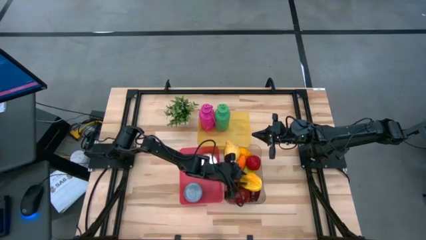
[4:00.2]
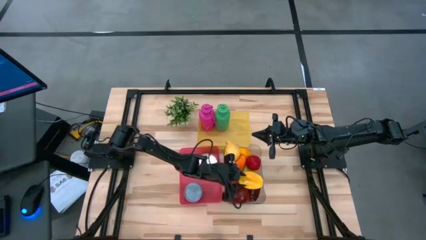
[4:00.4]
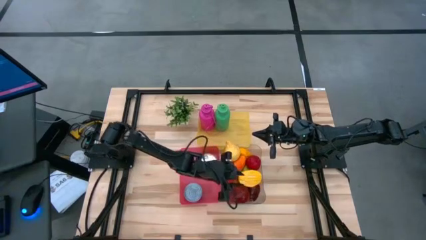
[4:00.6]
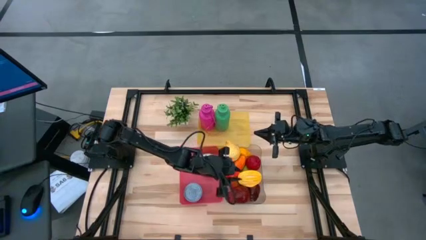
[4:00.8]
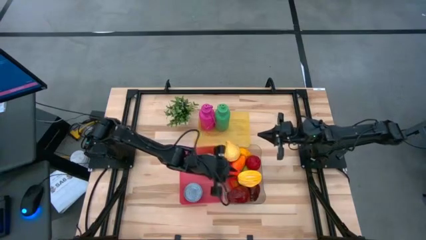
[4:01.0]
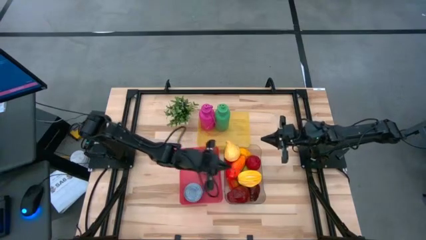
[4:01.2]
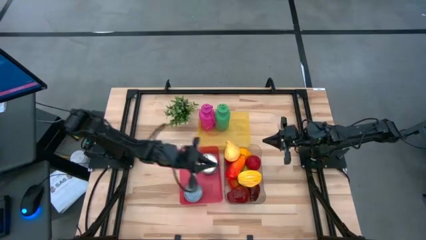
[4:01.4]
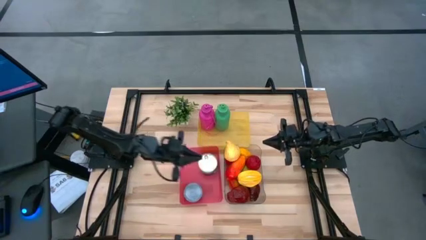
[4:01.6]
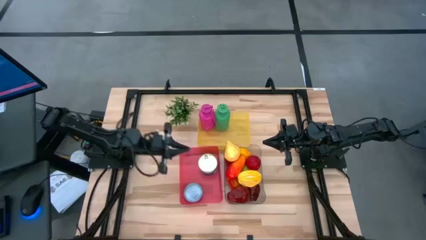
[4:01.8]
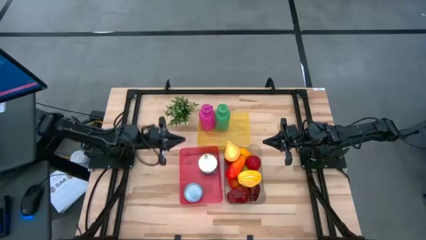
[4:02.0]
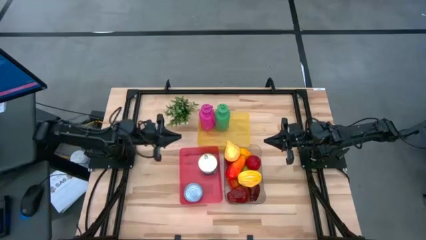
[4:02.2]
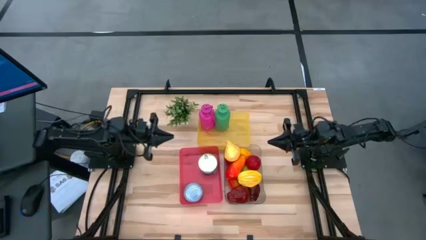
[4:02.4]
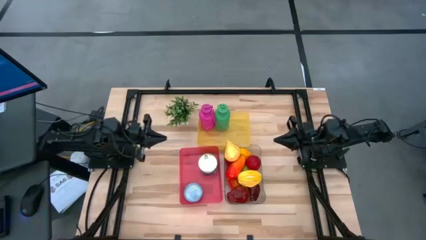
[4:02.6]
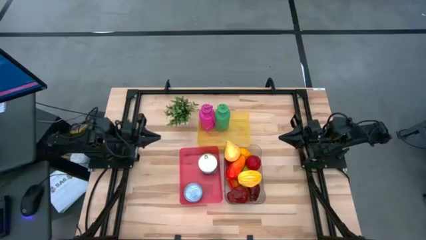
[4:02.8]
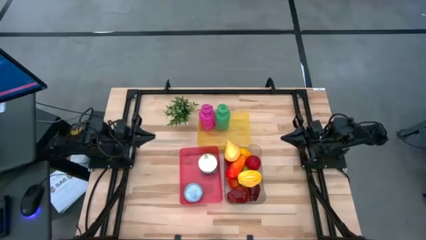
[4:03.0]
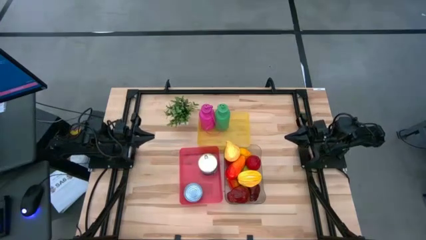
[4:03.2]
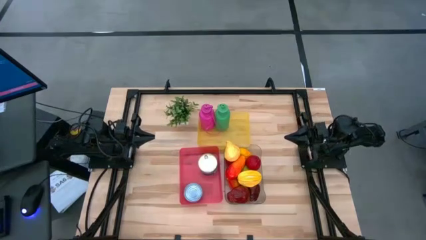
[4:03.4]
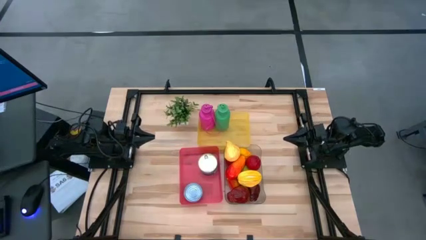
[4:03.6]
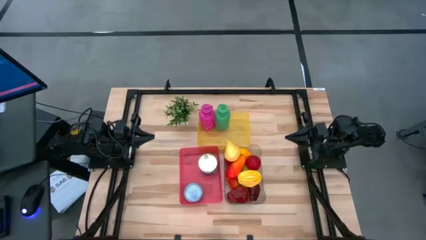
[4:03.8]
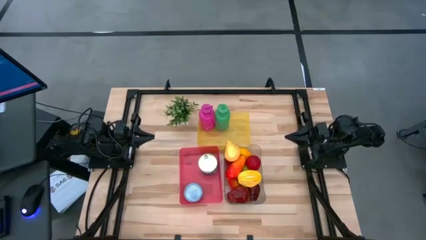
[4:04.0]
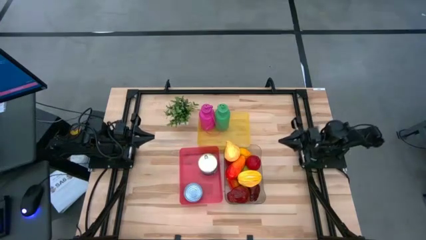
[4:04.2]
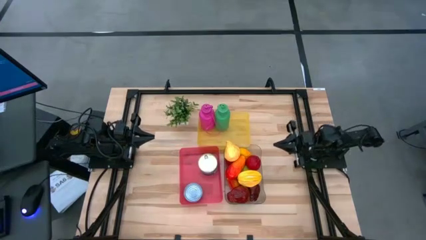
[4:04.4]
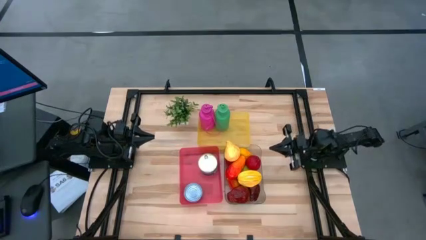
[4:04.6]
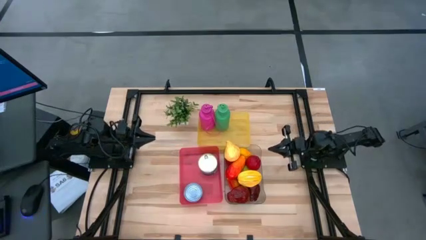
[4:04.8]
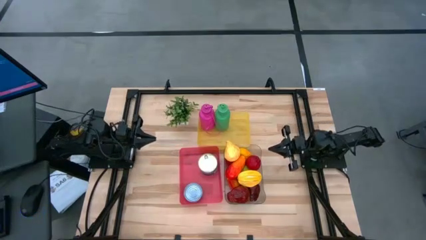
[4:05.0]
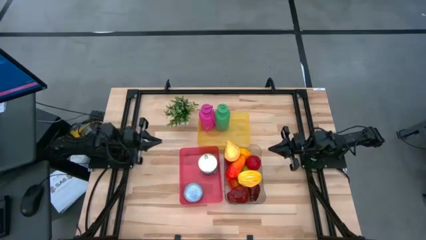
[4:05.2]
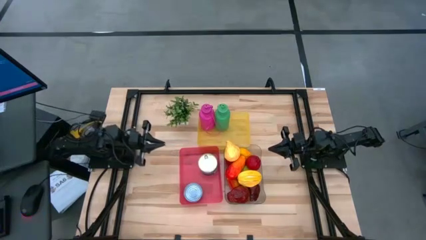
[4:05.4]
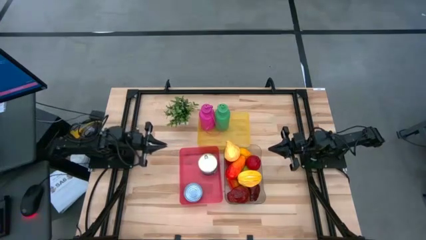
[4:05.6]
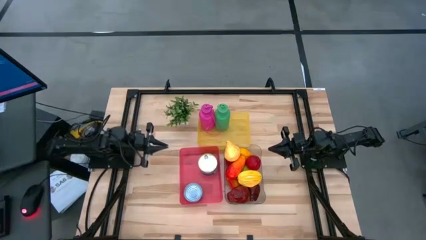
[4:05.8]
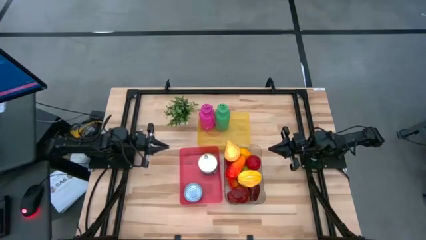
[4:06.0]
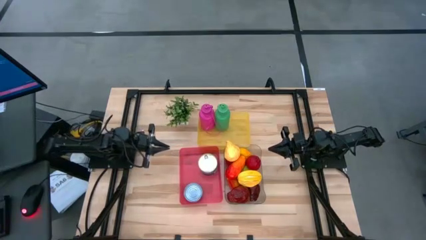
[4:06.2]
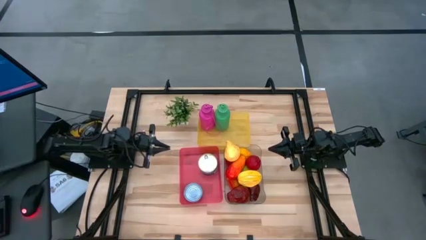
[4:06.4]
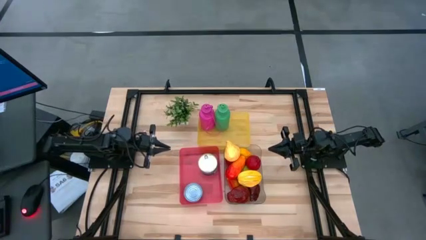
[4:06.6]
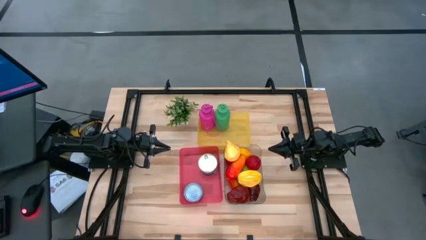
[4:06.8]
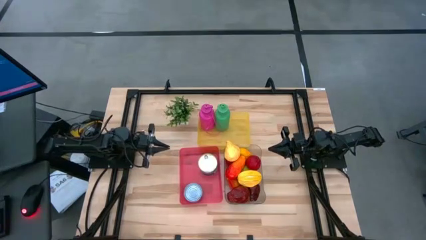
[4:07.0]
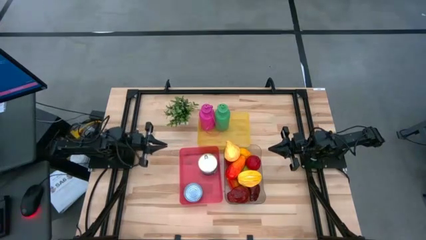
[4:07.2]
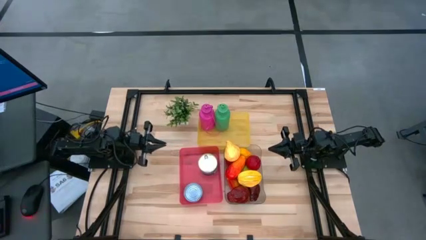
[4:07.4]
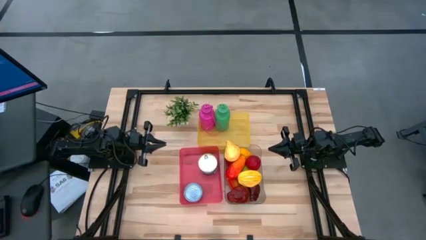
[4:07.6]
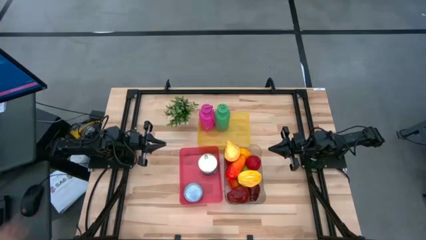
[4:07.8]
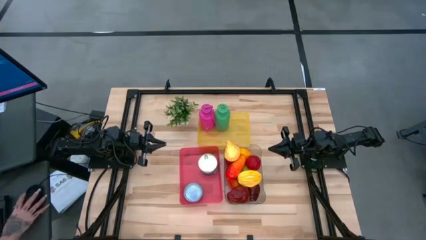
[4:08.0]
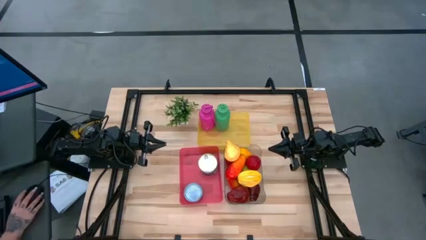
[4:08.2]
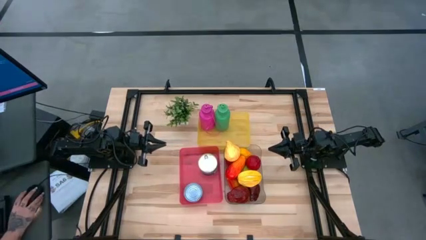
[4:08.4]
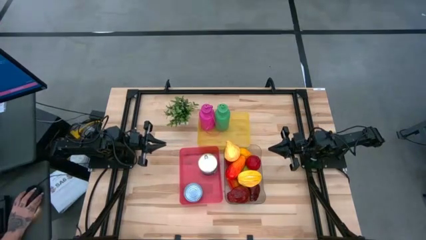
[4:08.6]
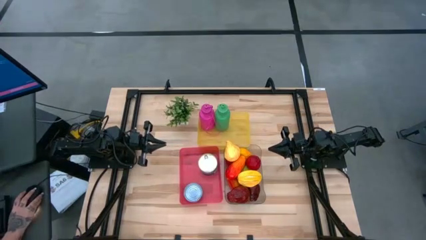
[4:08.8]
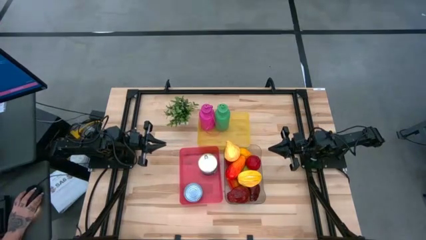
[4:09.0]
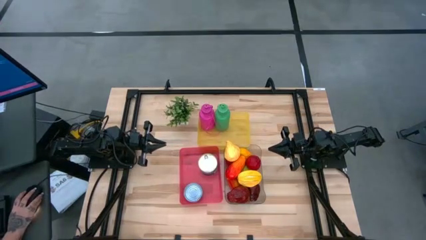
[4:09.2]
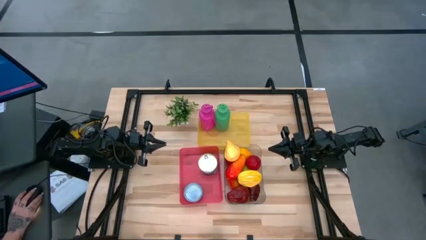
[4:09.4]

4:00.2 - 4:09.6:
Task: Pick & Place Food Item
Return to Home Position

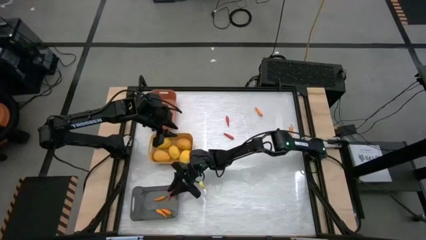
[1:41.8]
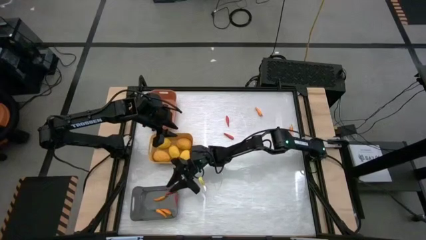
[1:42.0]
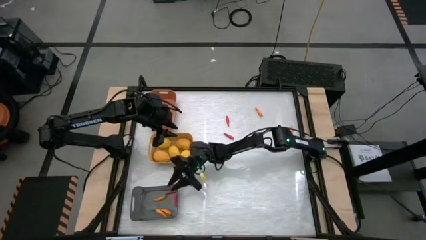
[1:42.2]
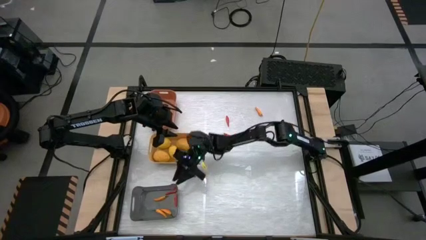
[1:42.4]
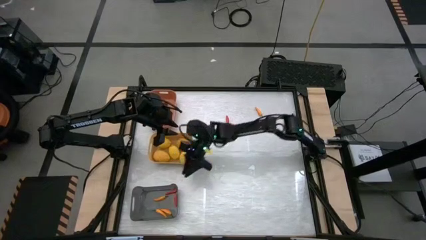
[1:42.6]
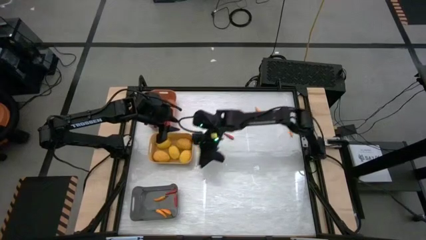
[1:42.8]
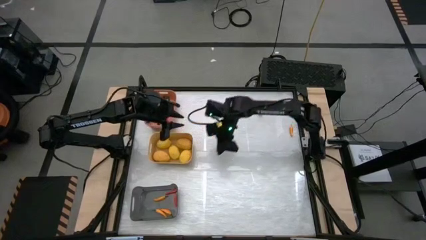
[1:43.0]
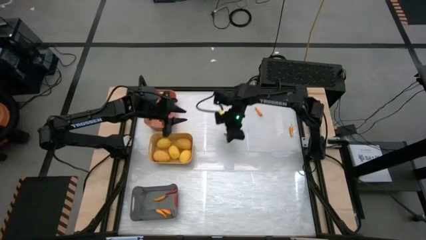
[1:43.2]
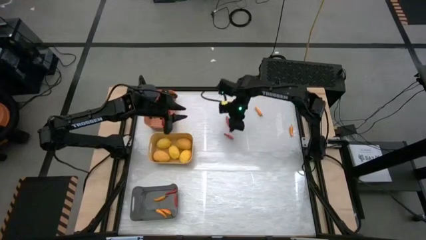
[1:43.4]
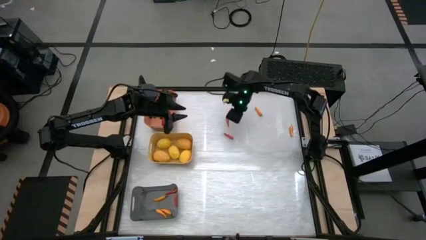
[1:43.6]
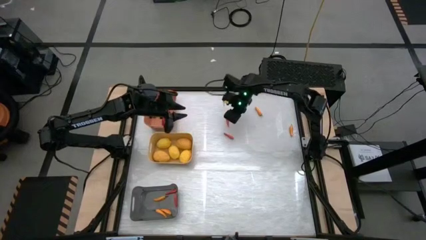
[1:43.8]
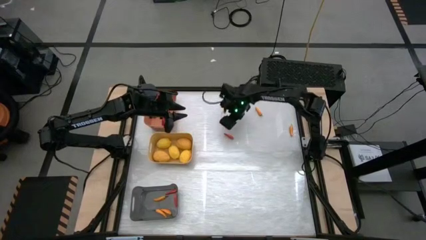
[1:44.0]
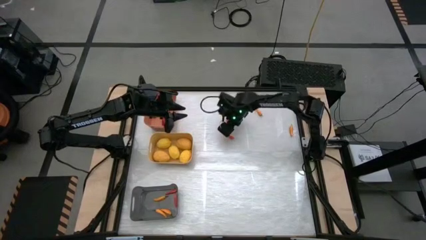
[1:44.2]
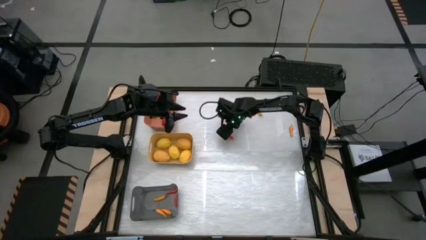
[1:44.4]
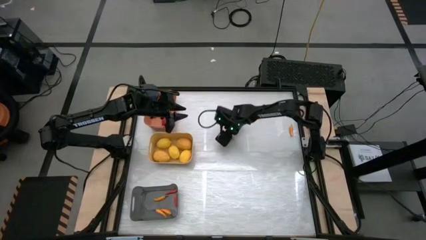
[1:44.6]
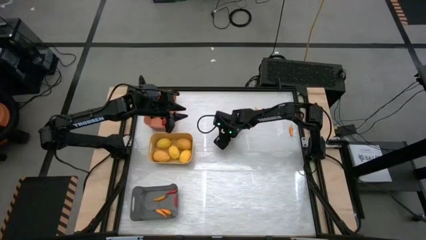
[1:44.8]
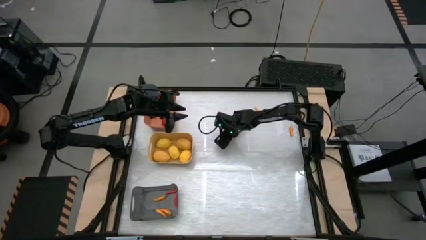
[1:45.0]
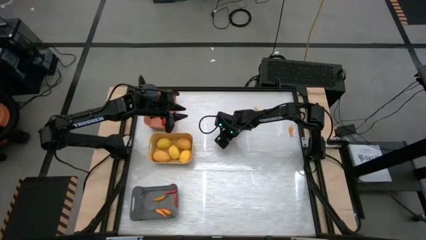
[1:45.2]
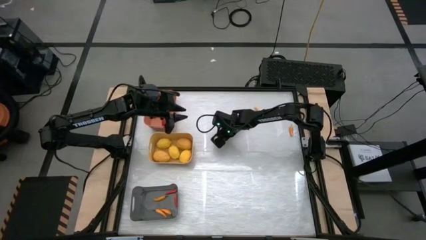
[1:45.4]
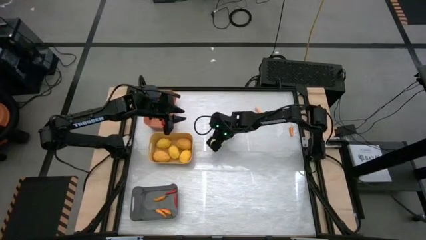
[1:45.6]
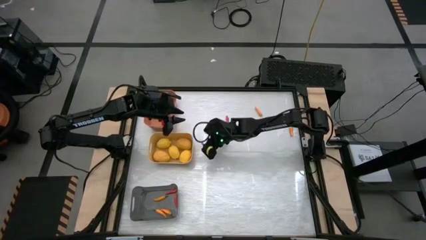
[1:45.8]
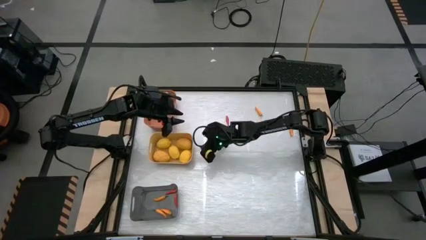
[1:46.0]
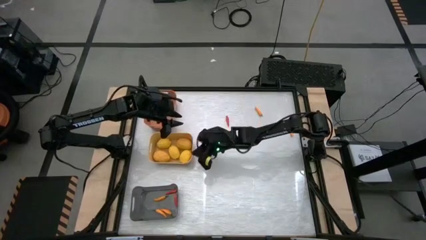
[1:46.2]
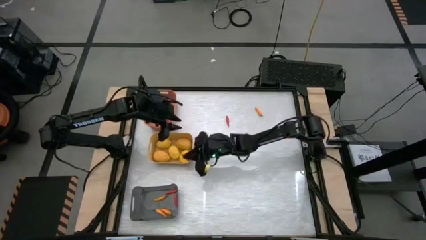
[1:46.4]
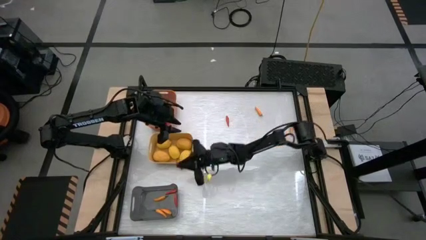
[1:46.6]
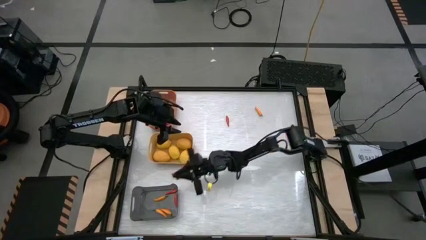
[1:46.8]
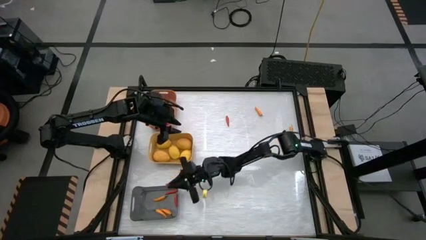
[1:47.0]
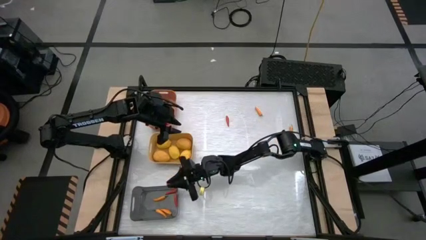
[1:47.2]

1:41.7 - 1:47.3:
Task: Sort produce into baskets
Put the red chili pepper into the gray bin
